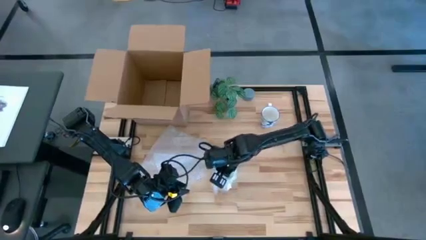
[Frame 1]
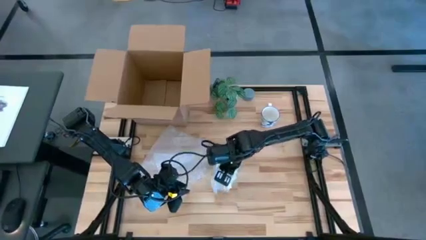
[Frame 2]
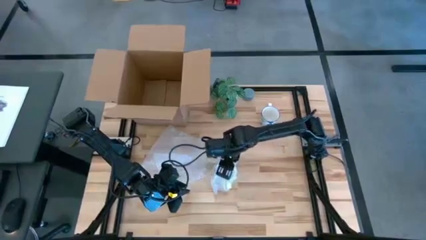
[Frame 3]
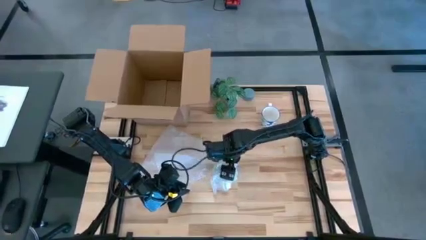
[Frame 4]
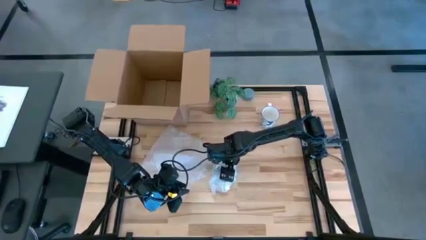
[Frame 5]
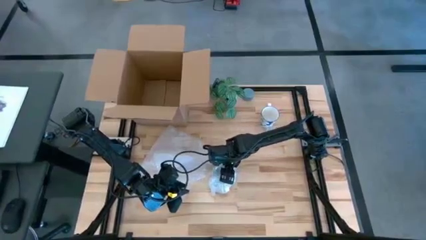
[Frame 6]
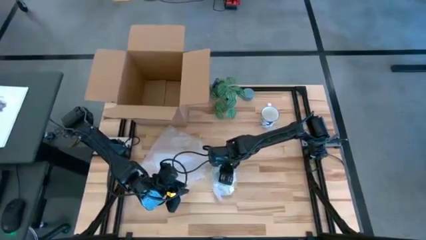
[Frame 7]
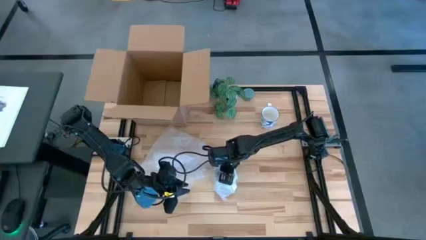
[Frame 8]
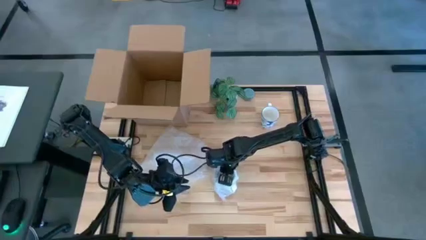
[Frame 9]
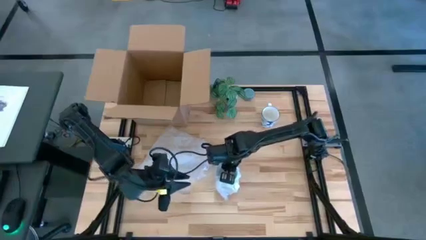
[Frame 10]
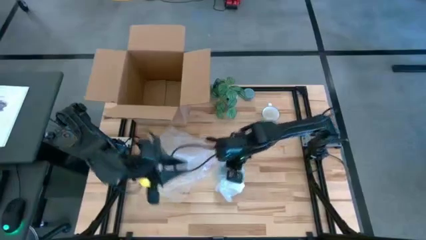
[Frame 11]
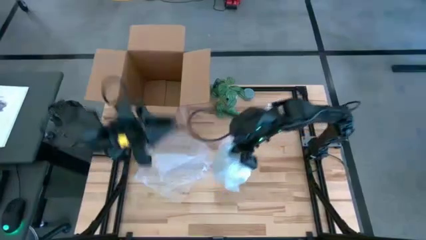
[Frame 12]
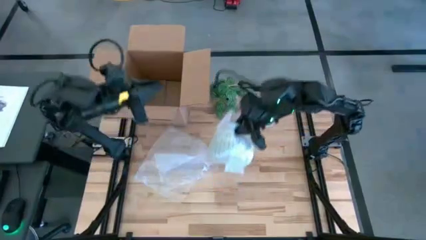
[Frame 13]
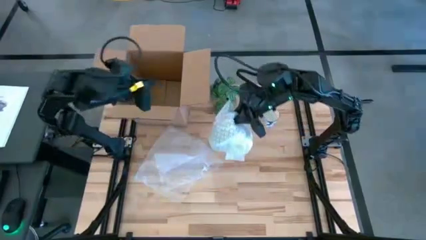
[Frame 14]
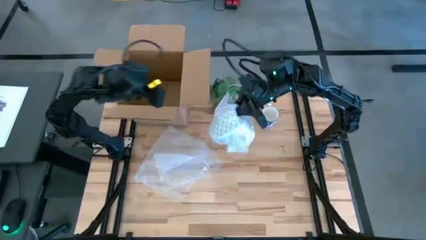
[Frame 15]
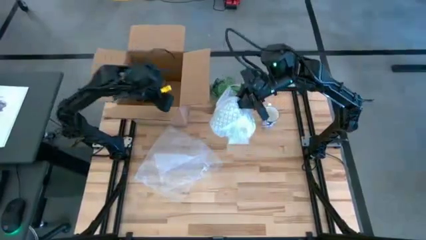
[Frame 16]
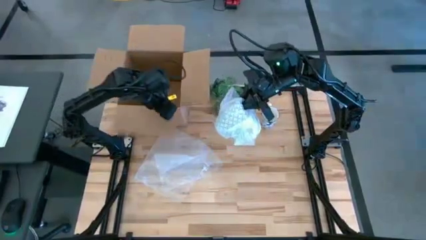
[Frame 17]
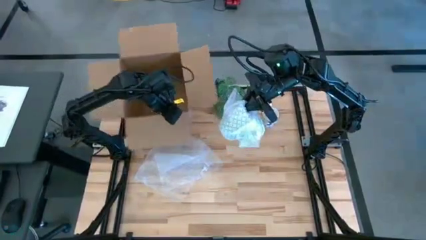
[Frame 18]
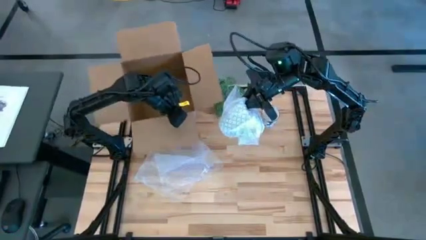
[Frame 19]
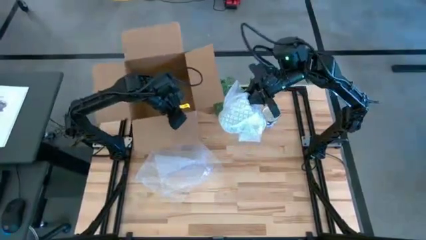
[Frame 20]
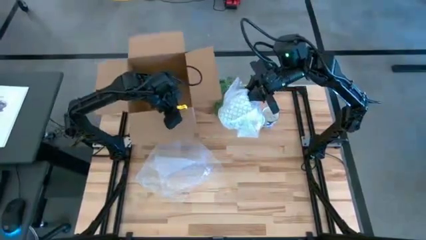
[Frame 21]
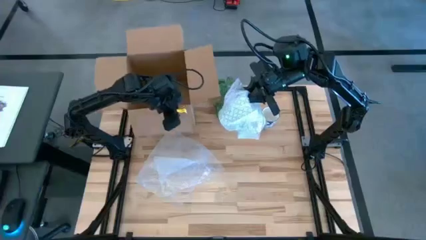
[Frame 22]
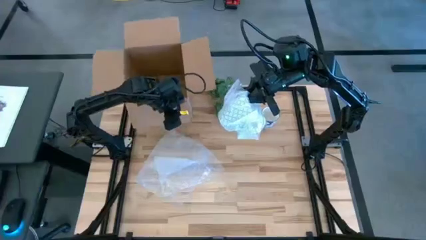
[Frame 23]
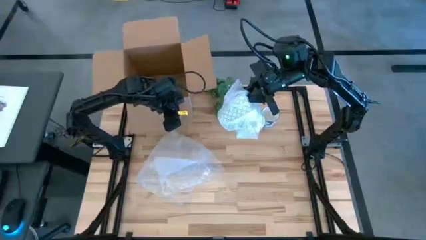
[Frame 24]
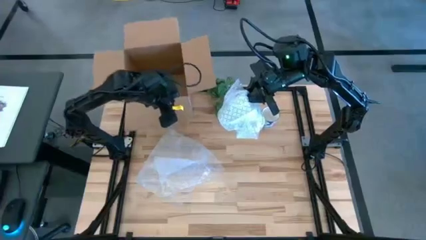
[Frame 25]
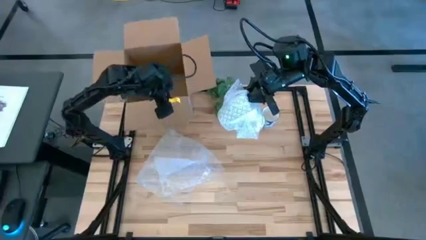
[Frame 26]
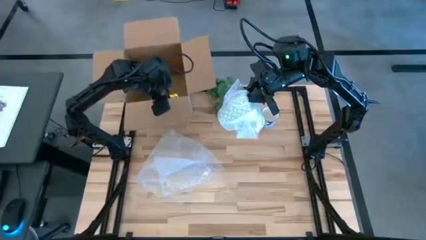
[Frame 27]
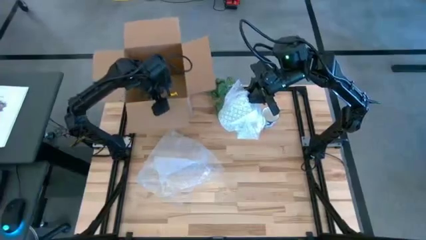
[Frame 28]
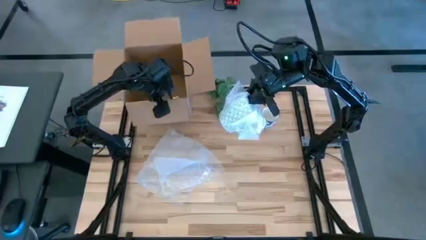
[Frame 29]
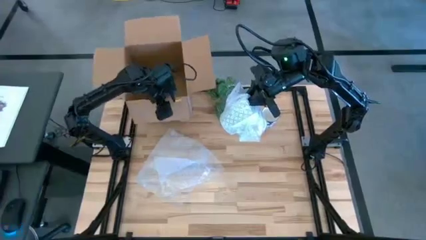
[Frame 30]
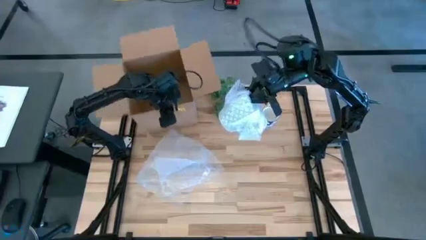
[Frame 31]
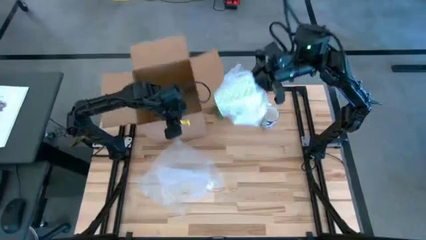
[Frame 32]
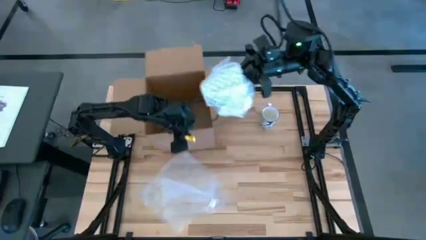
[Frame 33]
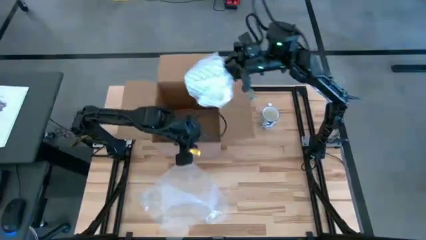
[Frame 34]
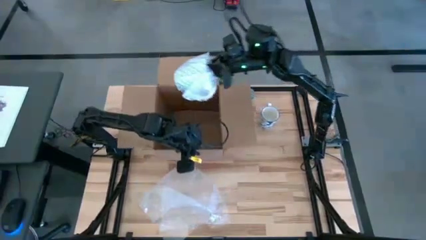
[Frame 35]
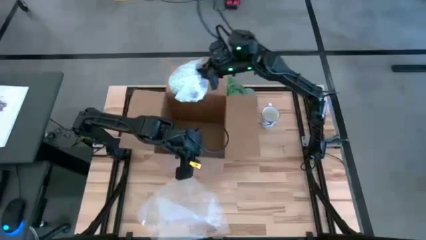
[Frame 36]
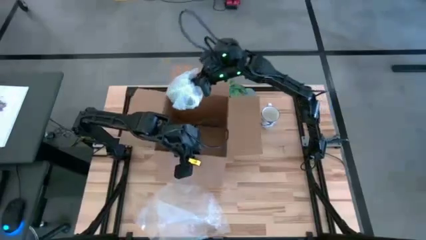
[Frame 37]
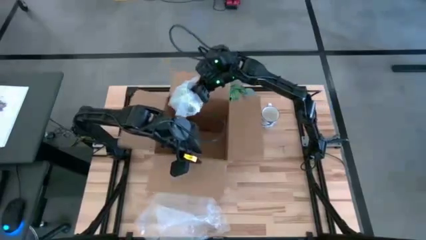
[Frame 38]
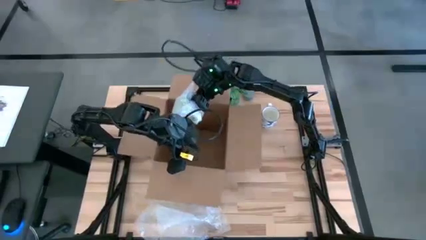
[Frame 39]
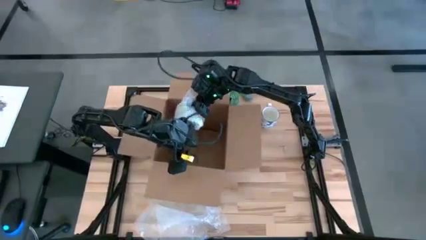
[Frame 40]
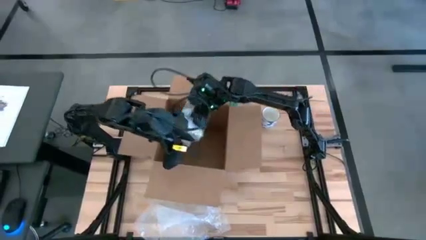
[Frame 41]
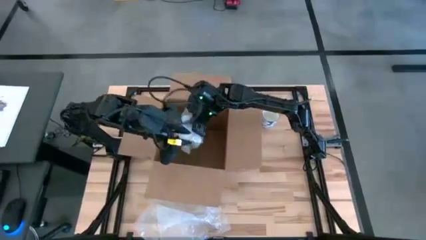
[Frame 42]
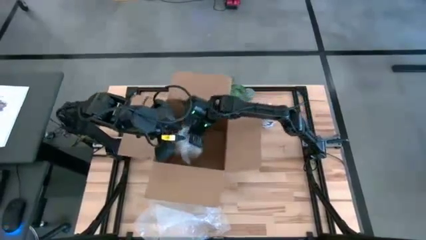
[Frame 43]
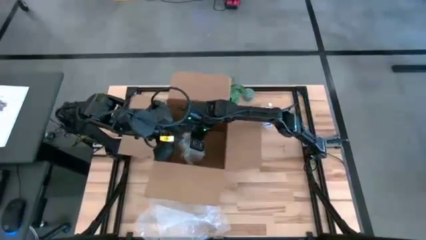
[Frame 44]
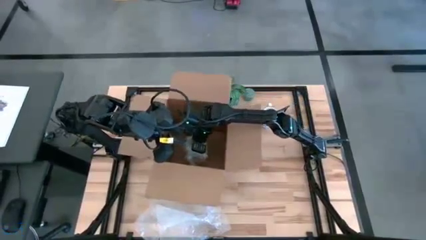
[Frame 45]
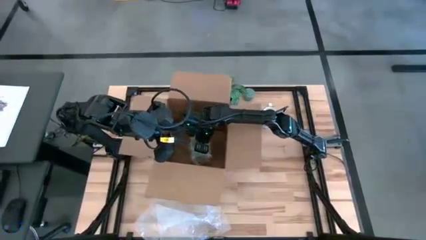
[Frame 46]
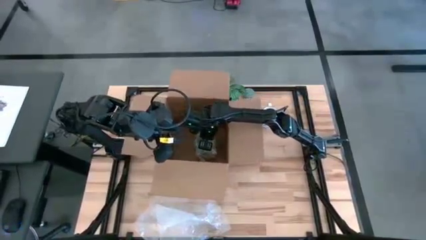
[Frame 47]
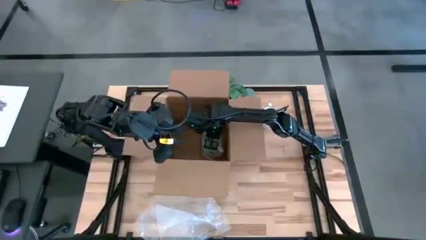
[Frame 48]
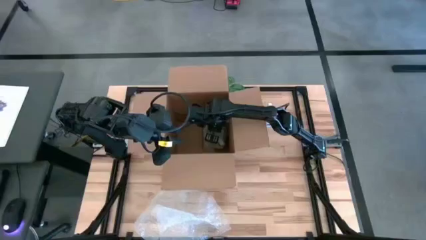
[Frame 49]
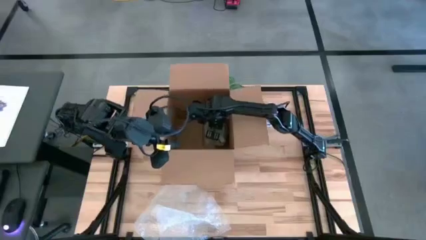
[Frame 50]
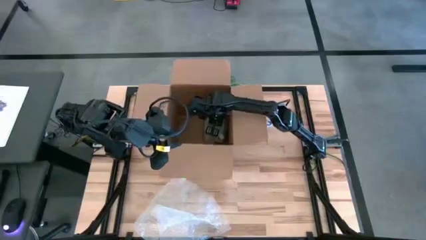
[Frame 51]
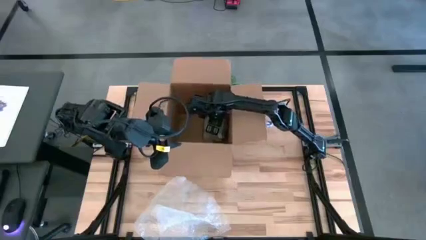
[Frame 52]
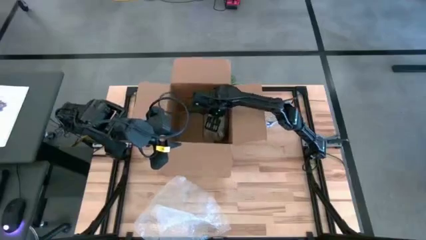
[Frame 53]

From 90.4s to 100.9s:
Task: wrap mug
Put the wrapped green mug into the box

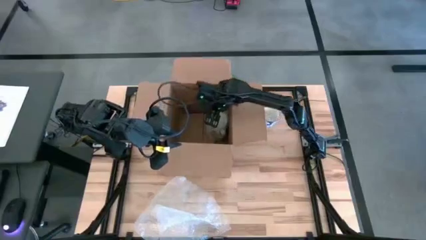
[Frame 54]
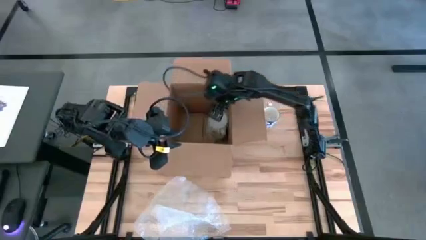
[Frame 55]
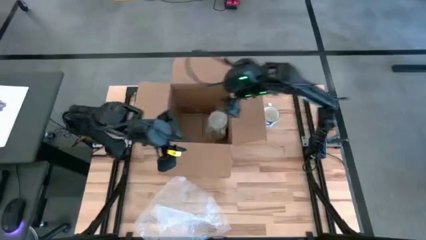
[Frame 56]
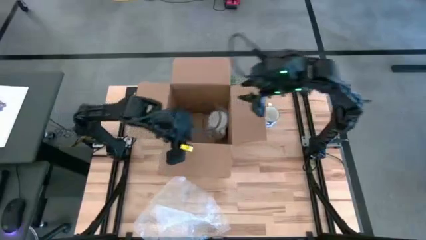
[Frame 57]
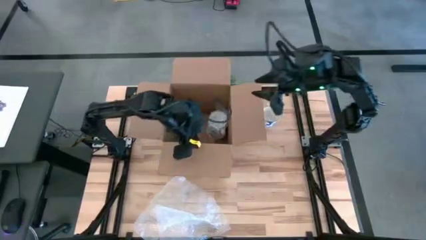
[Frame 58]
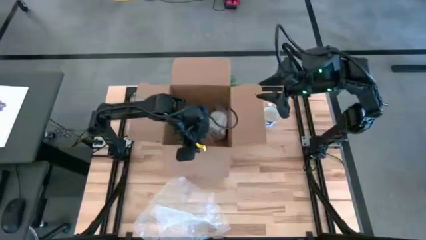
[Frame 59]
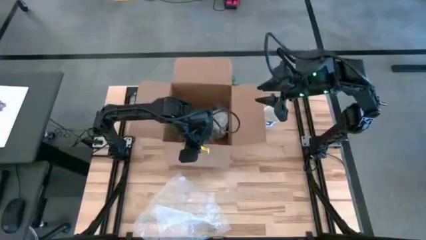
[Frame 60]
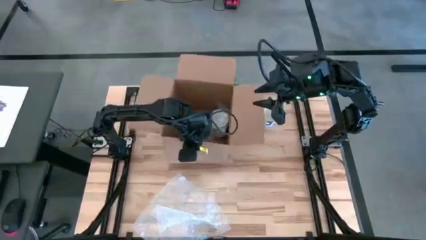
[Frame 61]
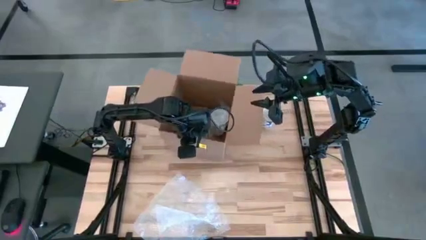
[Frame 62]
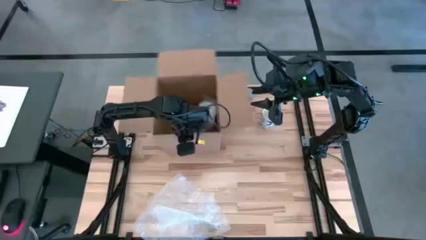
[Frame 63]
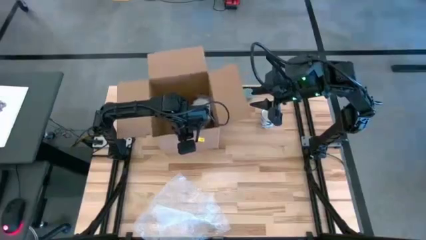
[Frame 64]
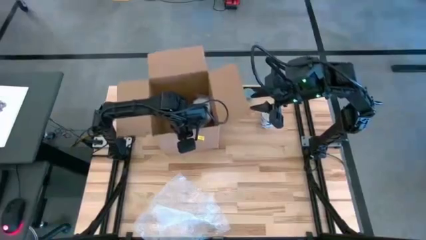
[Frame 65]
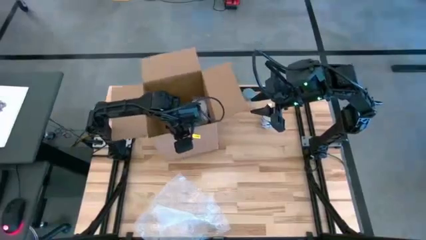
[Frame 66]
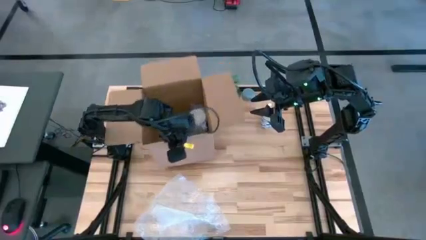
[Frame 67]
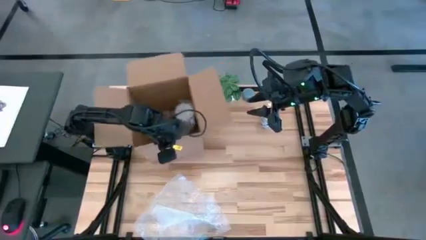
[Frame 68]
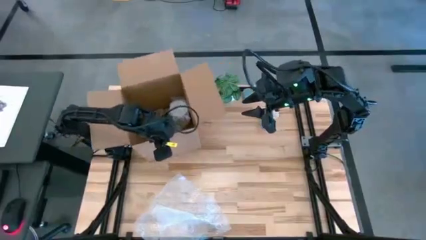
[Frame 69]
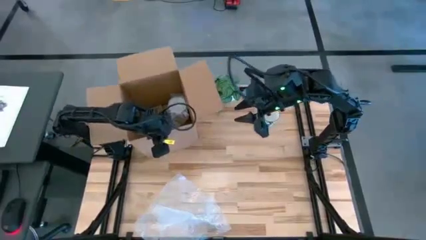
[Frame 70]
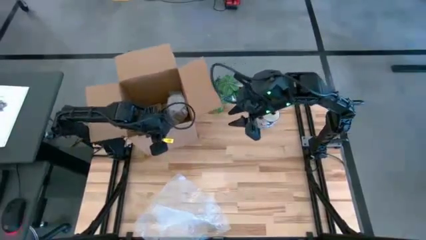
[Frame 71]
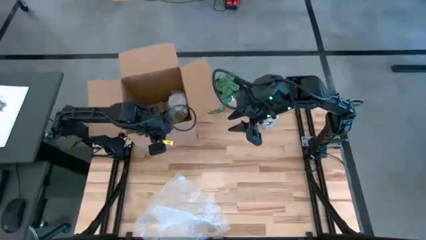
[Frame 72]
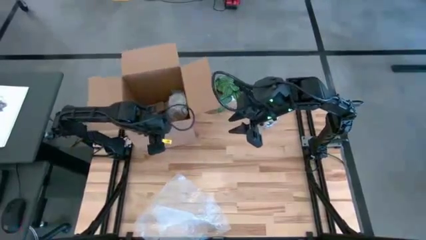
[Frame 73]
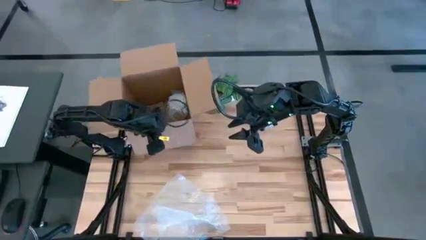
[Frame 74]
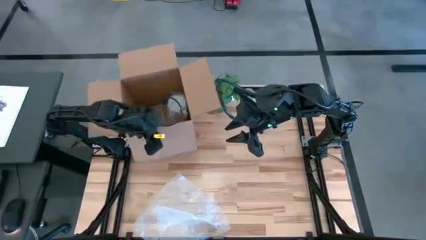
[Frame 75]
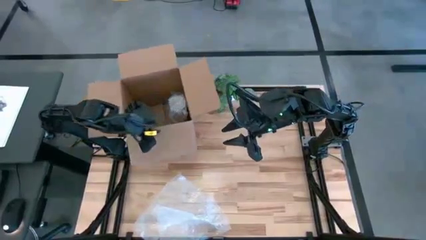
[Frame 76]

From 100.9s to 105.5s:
Adjust the box on the table

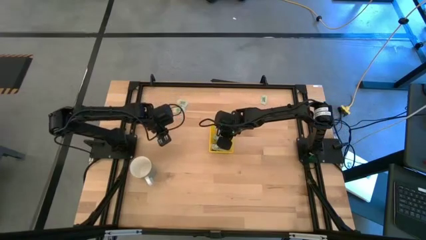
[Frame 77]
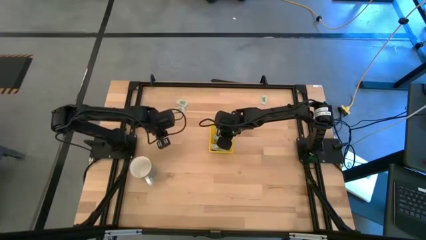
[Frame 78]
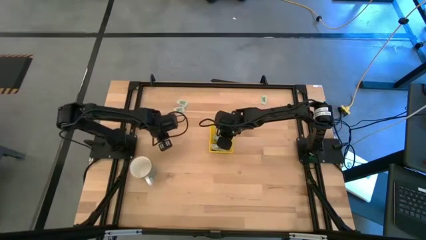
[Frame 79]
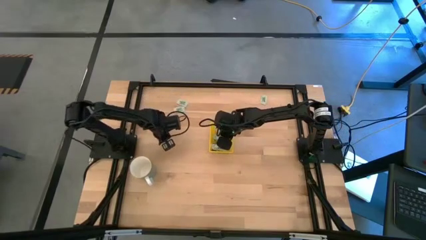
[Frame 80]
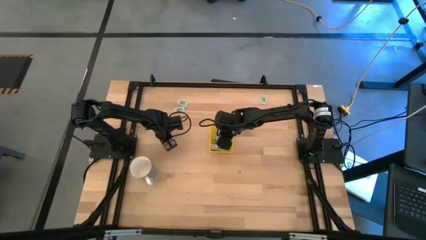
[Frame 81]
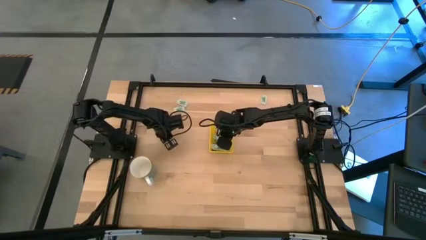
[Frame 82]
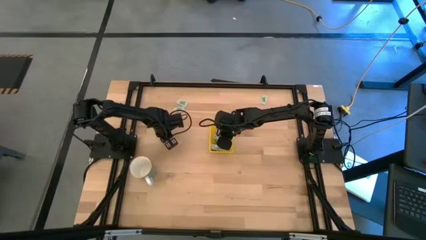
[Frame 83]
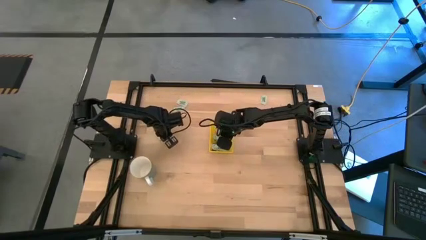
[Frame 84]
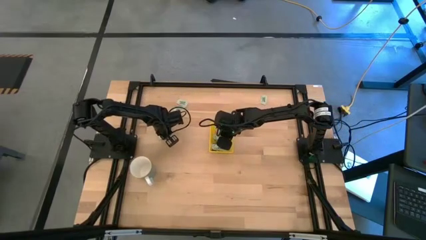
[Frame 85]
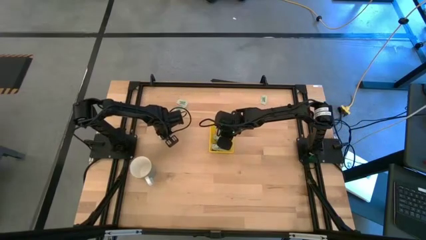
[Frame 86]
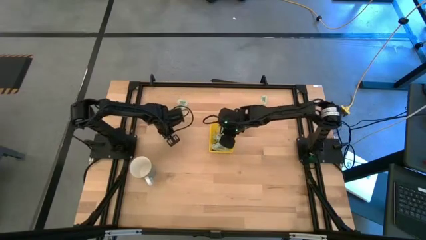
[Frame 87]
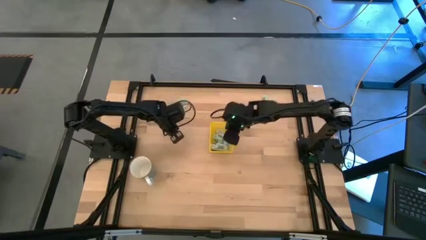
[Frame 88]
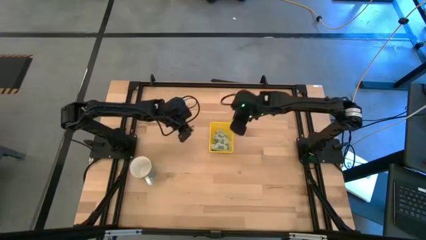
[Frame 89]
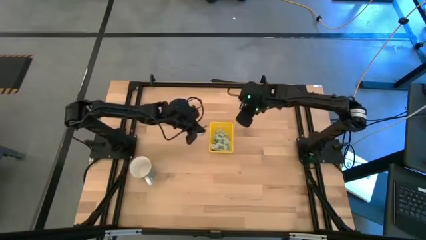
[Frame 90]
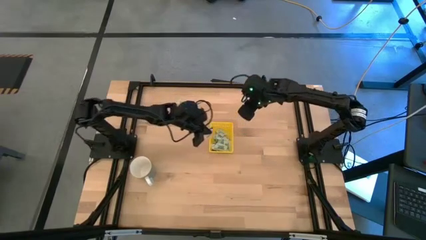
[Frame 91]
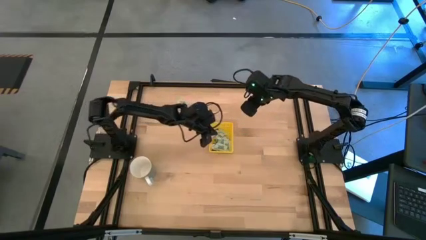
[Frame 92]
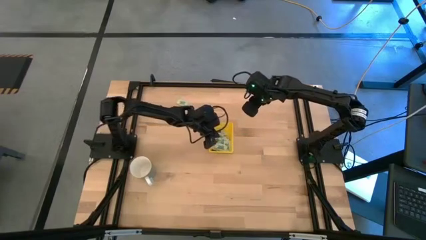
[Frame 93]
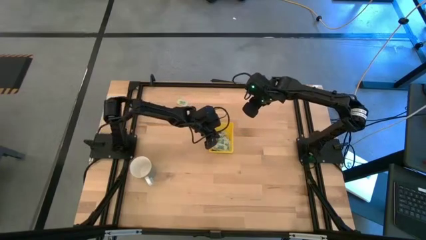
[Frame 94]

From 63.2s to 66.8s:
Task: Pick and place Stevia / Truvia into bins
Put the green stevia packet into the yellow bin
